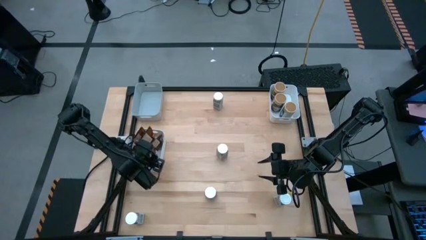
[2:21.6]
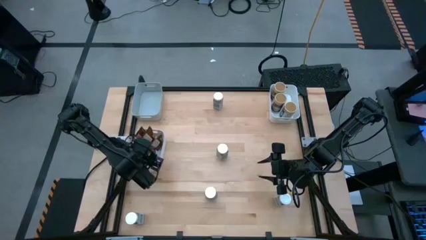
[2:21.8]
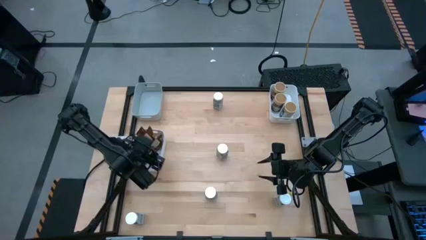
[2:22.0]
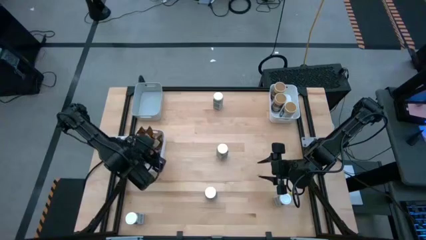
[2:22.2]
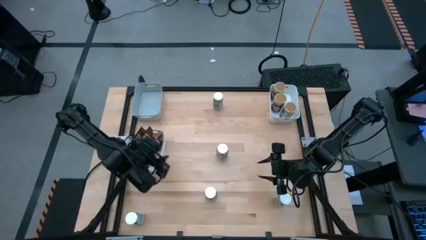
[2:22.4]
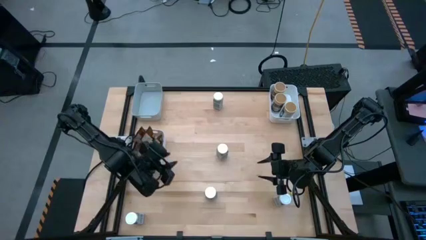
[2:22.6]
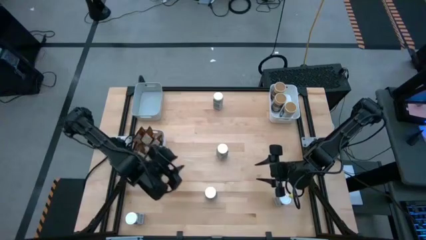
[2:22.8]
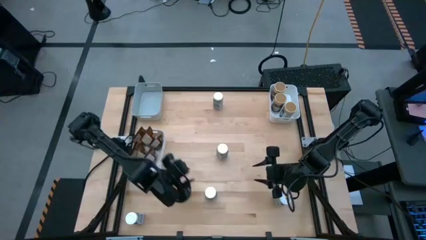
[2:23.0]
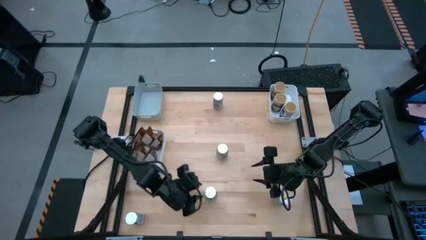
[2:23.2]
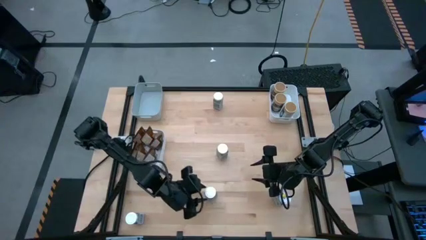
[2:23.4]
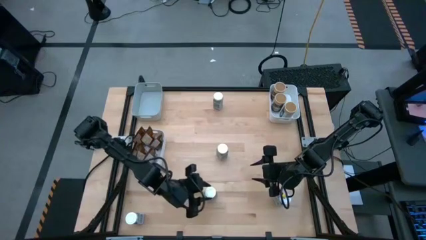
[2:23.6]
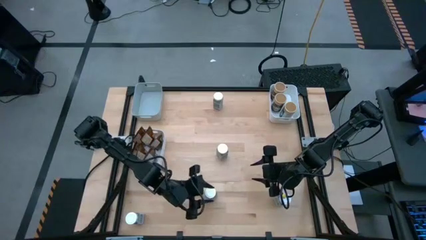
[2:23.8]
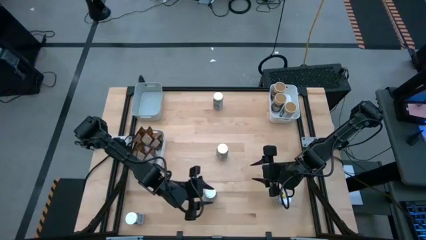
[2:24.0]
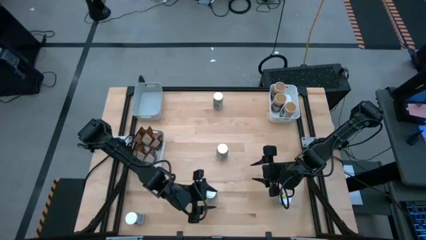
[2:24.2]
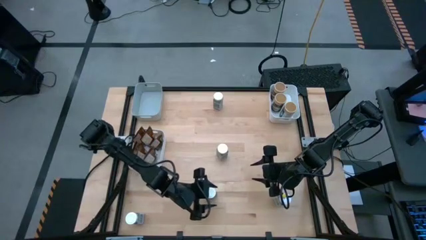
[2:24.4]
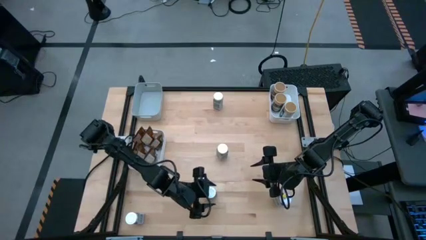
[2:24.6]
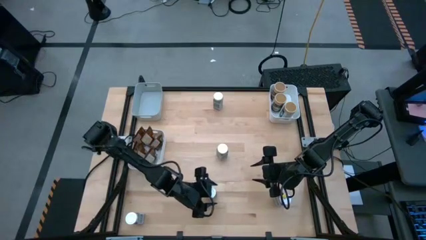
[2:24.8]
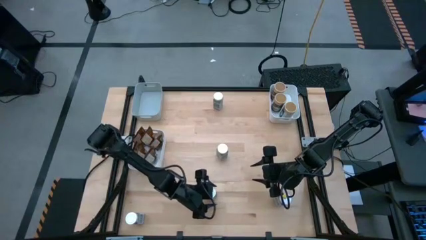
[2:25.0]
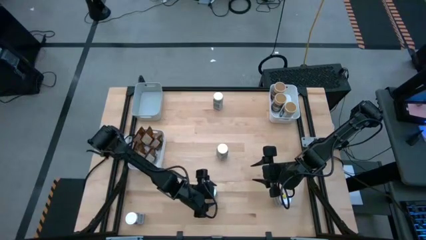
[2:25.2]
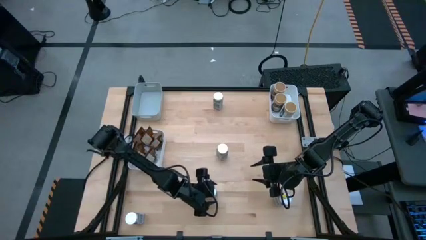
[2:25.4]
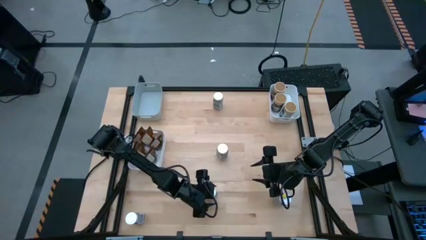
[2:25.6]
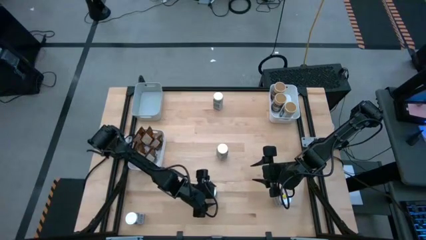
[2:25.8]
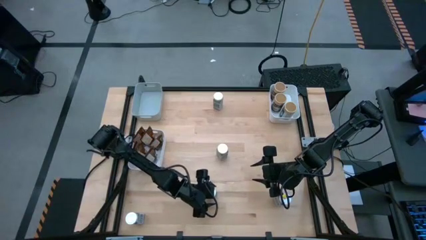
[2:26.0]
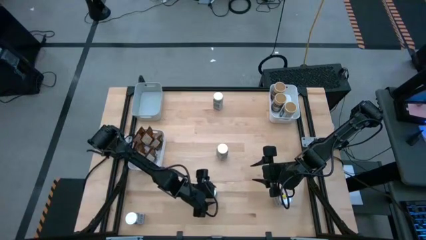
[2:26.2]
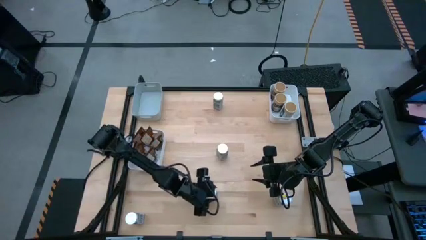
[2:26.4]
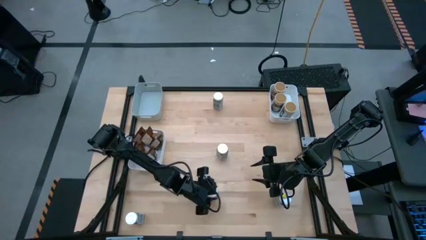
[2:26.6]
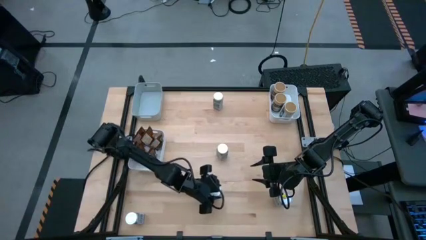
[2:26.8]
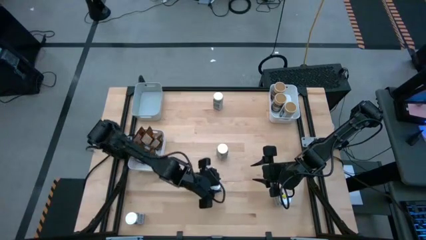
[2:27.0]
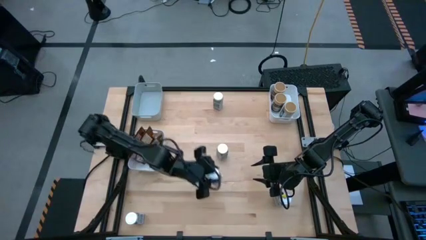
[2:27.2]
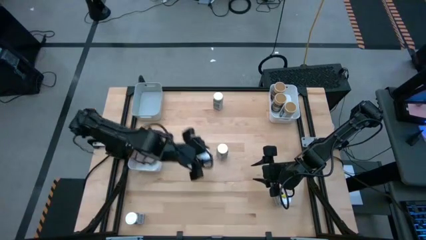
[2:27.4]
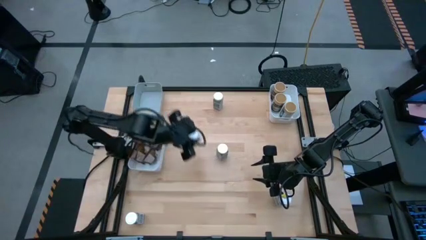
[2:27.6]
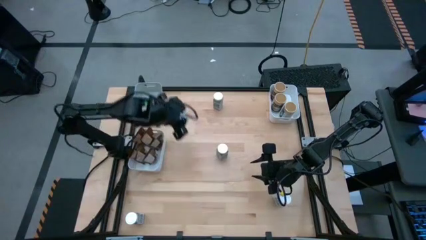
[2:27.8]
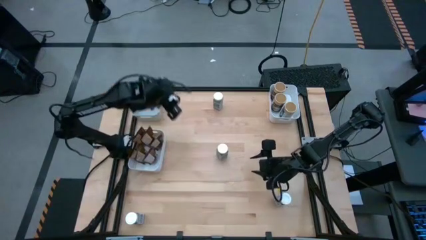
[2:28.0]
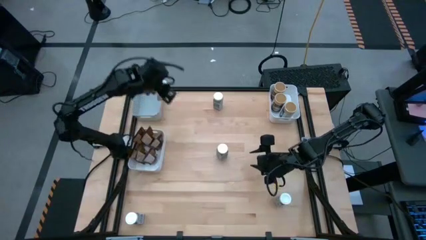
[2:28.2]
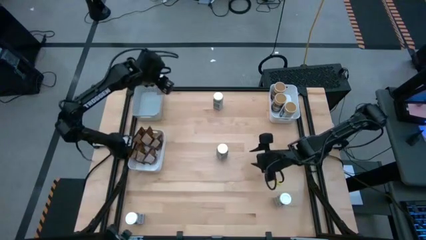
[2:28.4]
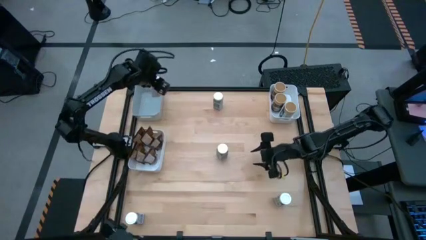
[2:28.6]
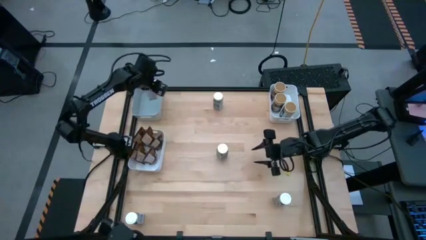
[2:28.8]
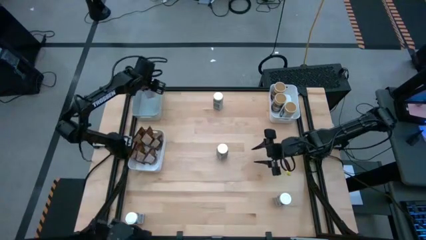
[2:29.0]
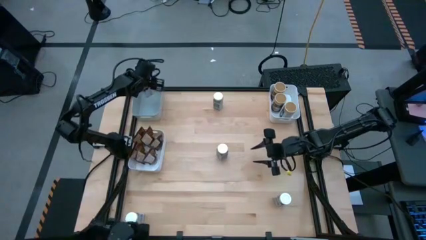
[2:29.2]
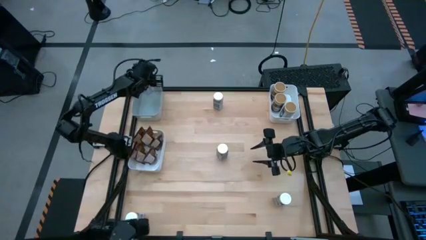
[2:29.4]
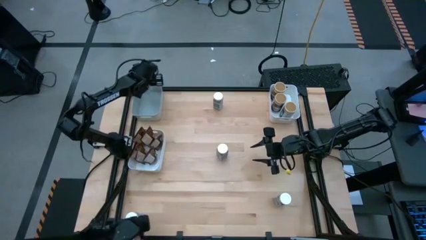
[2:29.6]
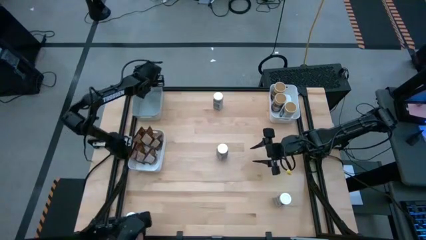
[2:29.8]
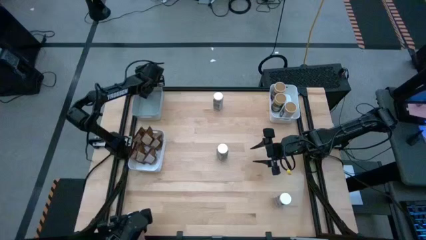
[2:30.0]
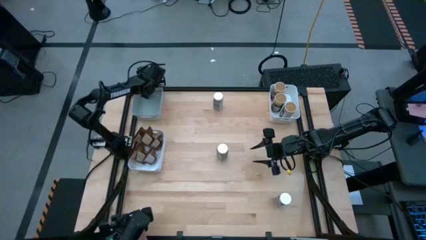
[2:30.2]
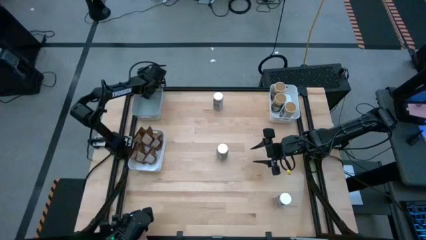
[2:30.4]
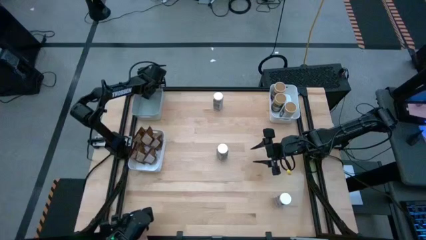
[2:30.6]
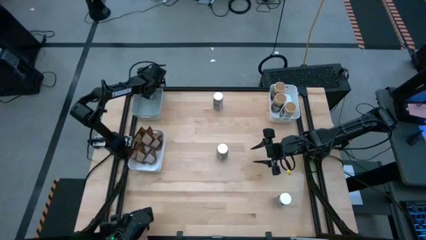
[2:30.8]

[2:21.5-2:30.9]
Task: Sort spices by type
Put the white seasoning bottle into the gray bin

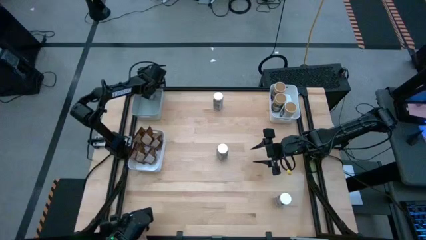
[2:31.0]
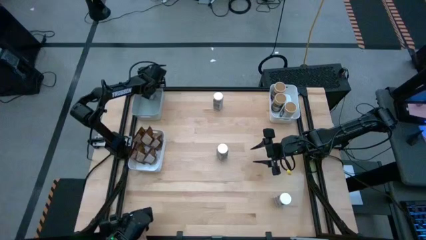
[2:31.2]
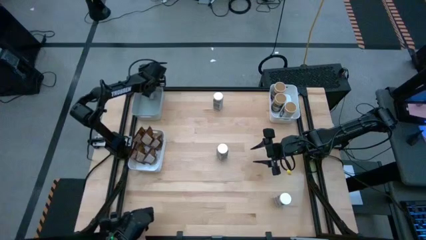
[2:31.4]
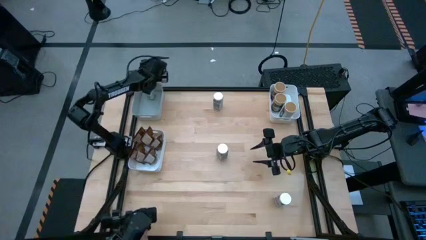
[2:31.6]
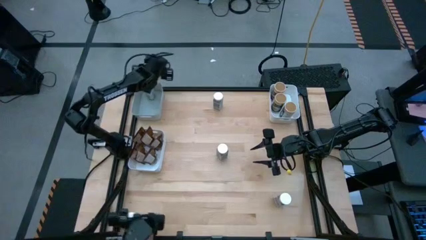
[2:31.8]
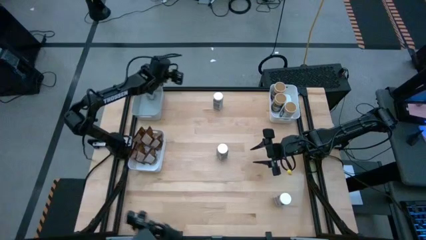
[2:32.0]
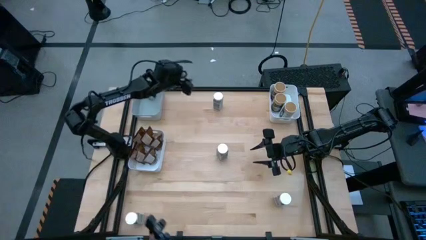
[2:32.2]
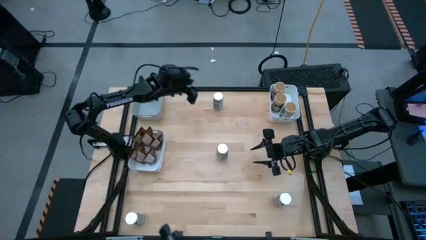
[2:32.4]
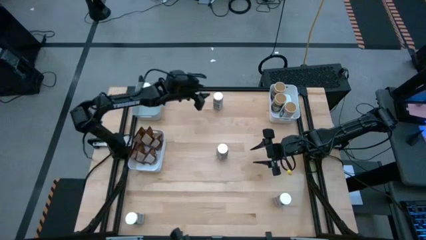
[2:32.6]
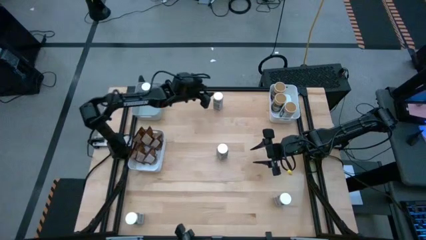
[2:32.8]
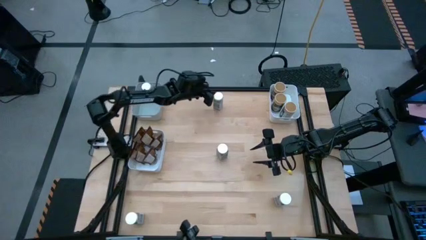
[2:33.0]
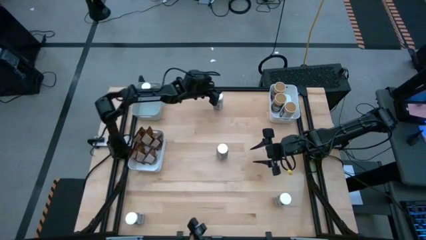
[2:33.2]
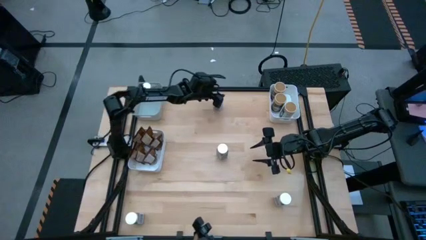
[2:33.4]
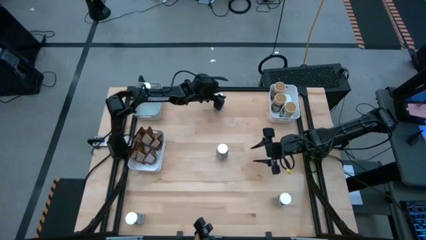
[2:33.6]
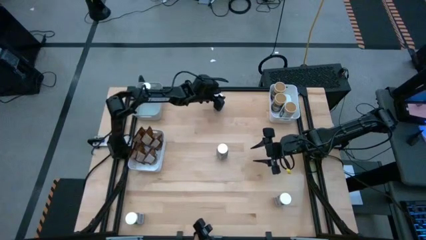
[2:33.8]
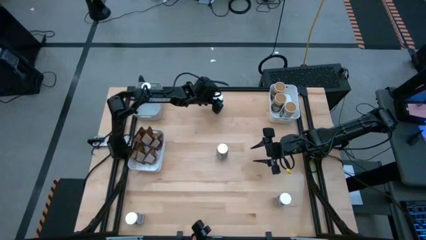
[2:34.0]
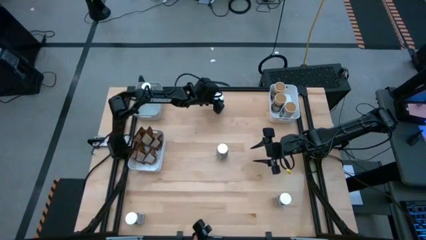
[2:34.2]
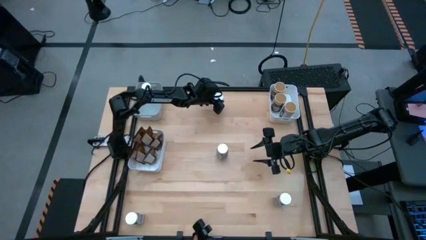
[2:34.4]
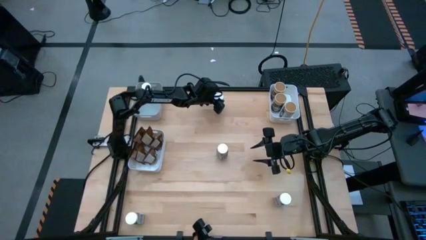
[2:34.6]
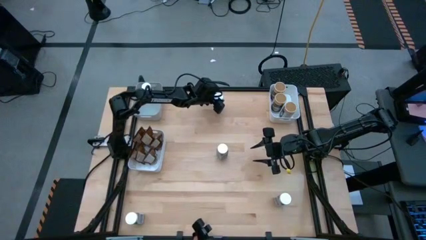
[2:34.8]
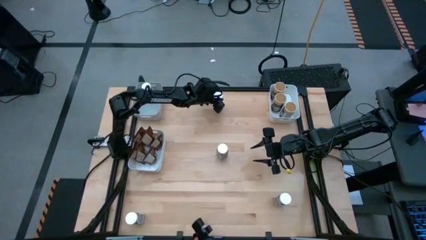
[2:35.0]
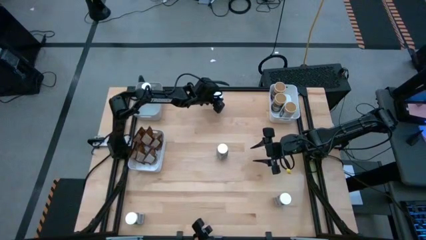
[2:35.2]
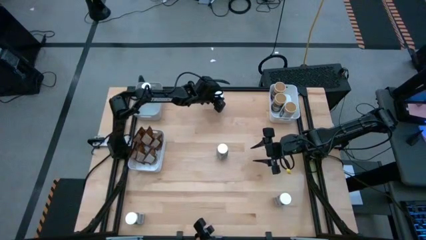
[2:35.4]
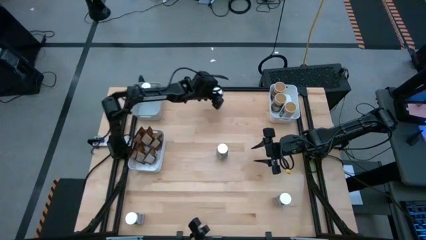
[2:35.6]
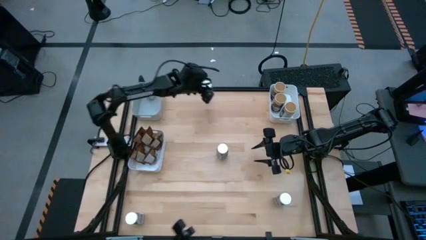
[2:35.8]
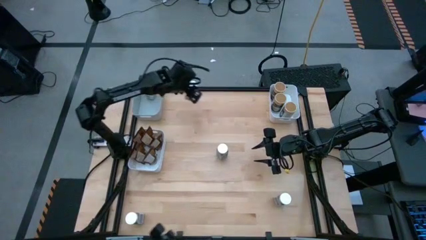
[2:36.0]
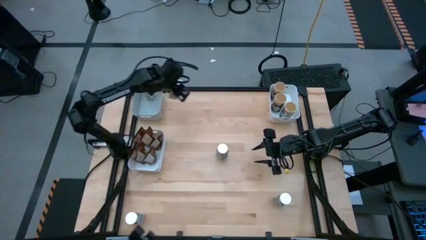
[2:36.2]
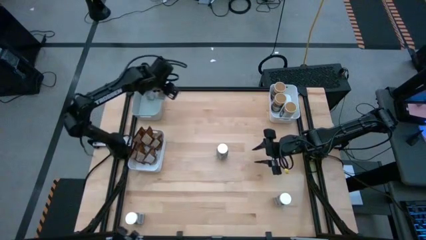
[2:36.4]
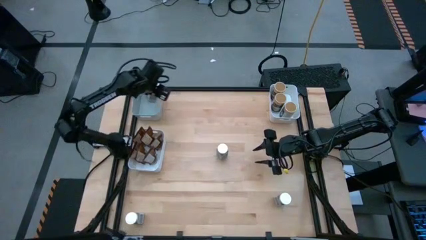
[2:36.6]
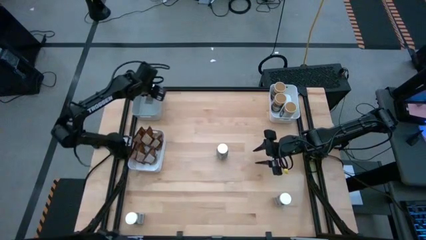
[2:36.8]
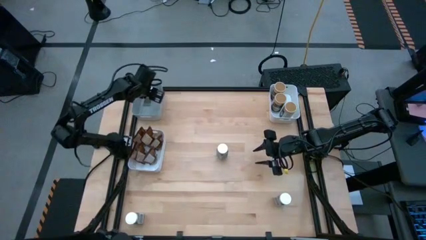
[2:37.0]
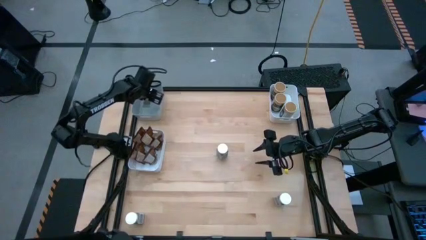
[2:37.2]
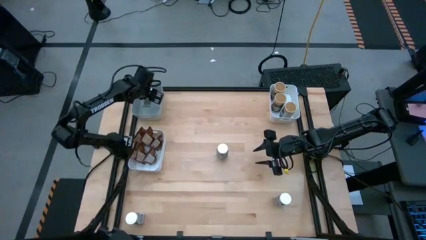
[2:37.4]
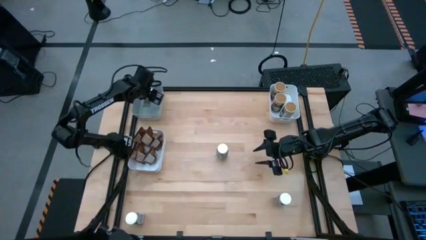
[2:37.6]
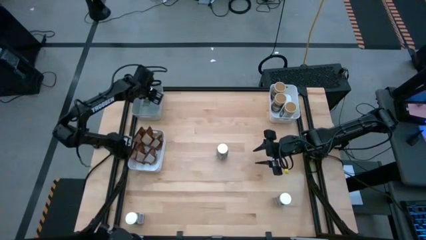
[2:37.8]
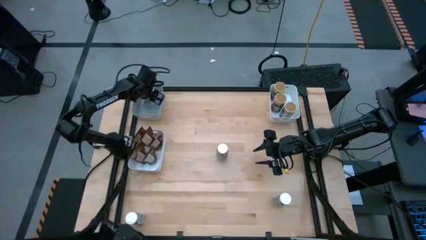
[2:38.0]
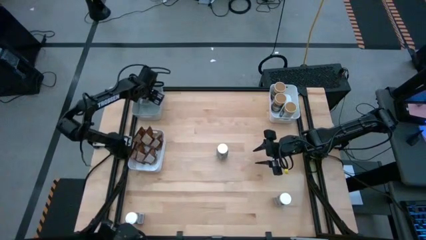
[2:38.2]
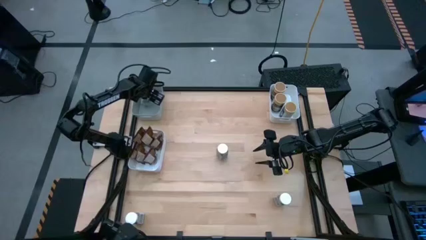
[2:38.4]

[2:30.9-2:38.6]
Put the white seasoning bottle into the gray bin
